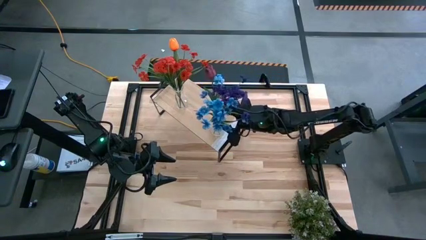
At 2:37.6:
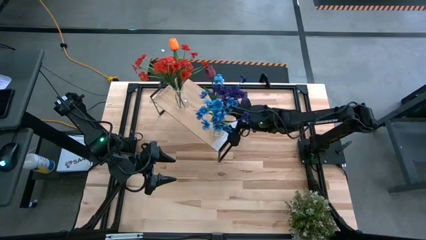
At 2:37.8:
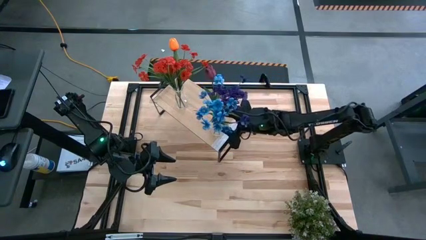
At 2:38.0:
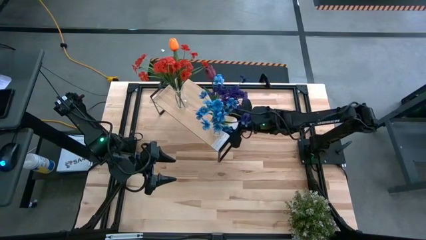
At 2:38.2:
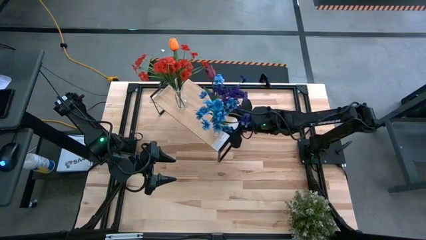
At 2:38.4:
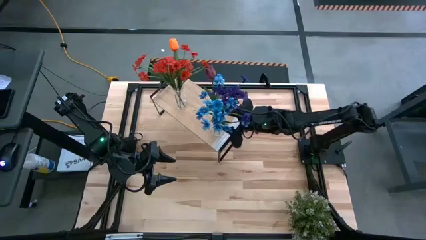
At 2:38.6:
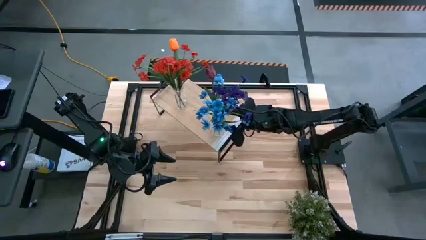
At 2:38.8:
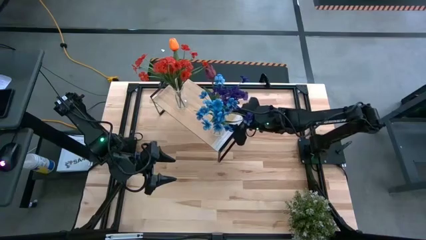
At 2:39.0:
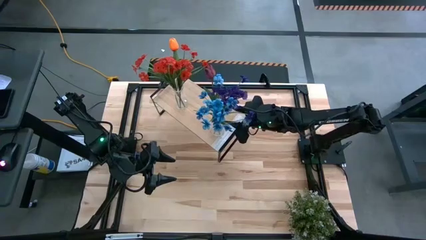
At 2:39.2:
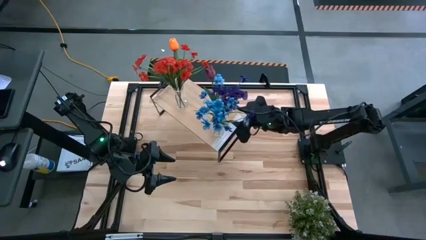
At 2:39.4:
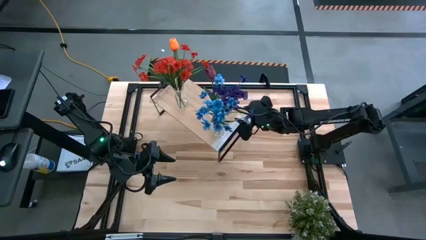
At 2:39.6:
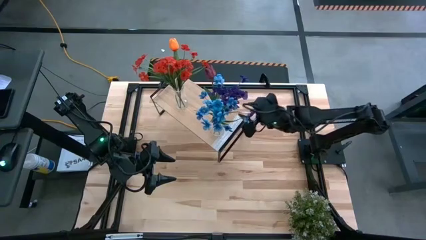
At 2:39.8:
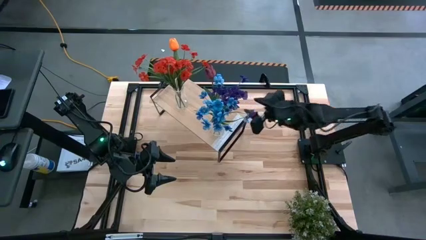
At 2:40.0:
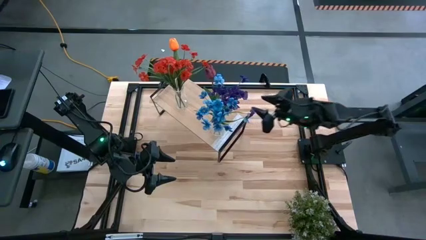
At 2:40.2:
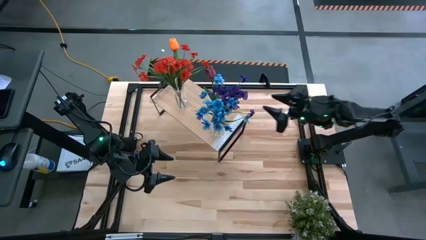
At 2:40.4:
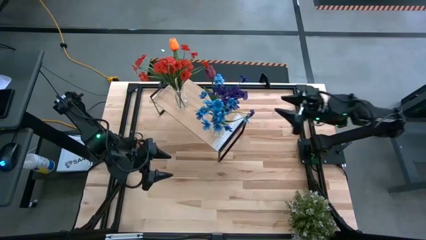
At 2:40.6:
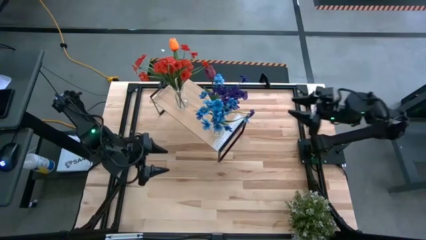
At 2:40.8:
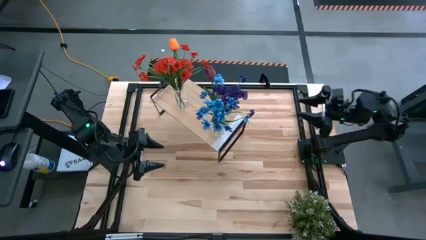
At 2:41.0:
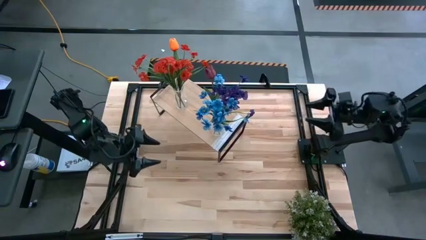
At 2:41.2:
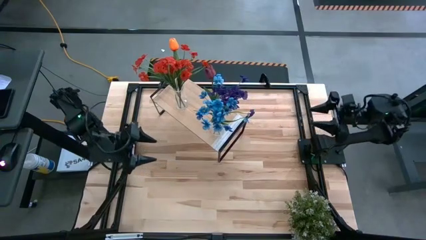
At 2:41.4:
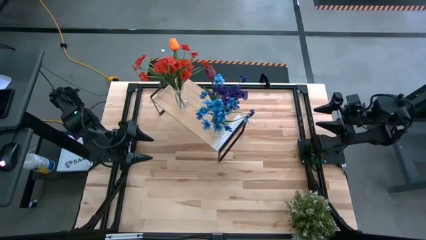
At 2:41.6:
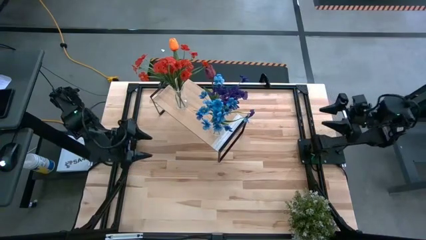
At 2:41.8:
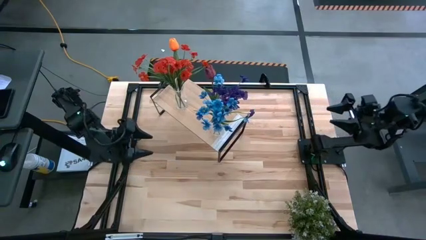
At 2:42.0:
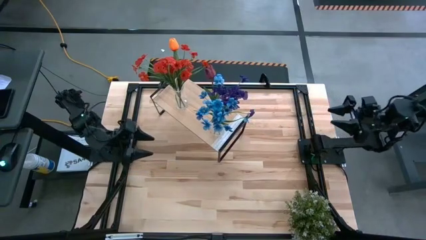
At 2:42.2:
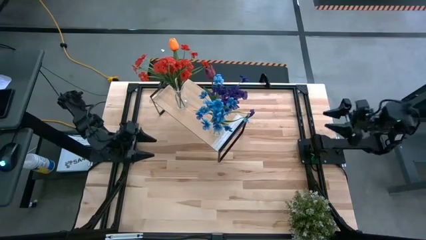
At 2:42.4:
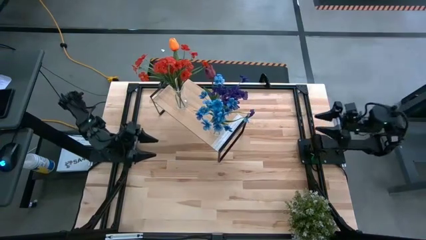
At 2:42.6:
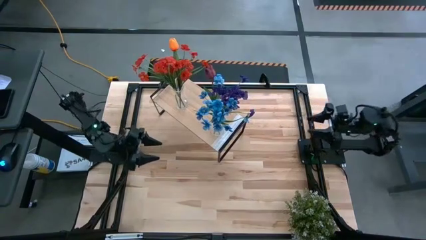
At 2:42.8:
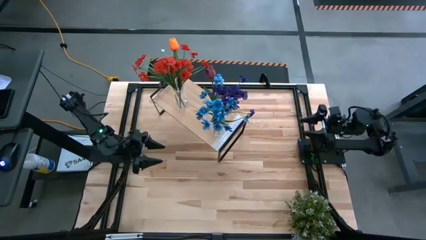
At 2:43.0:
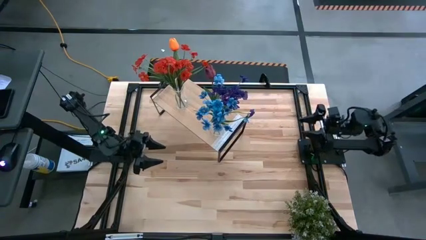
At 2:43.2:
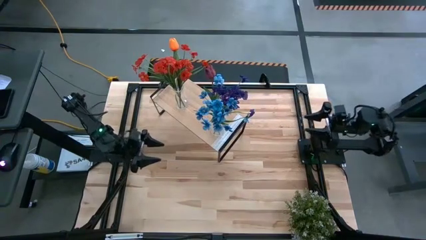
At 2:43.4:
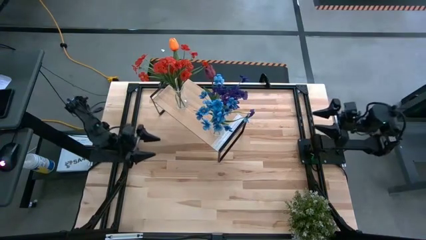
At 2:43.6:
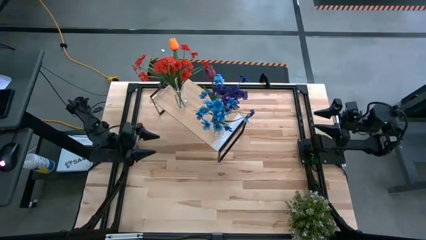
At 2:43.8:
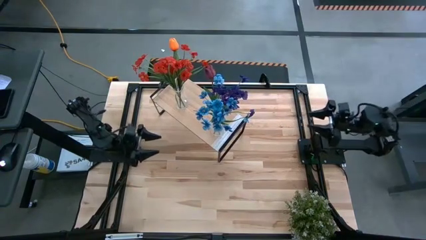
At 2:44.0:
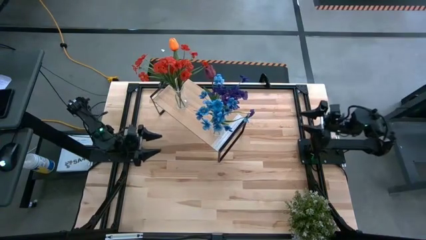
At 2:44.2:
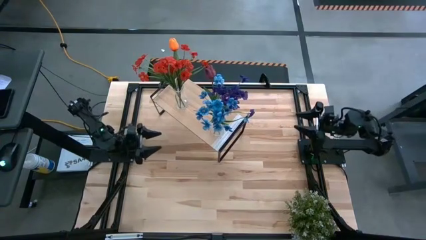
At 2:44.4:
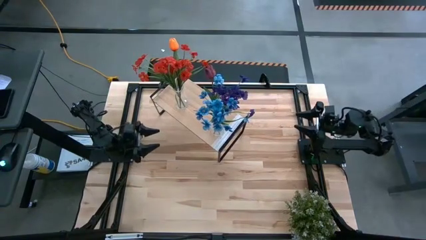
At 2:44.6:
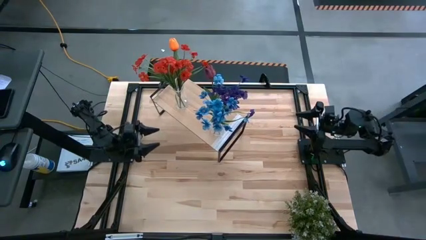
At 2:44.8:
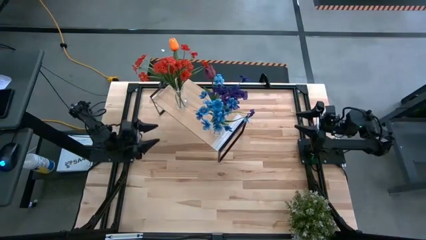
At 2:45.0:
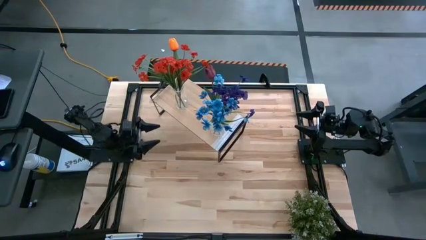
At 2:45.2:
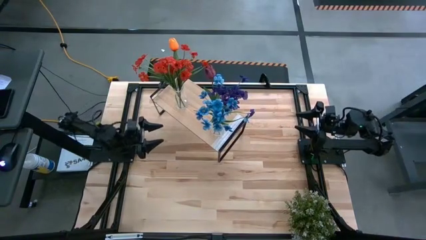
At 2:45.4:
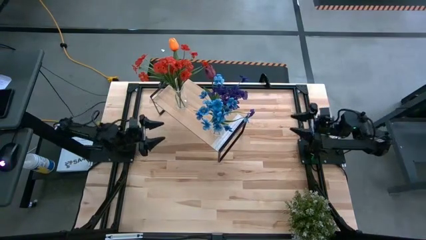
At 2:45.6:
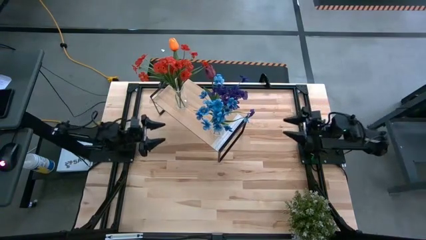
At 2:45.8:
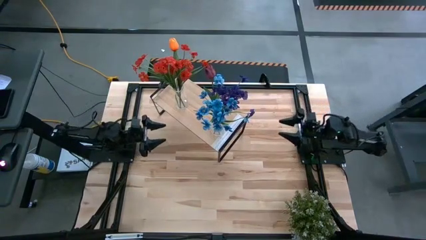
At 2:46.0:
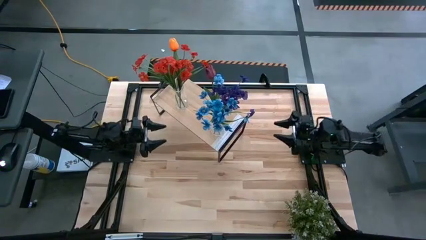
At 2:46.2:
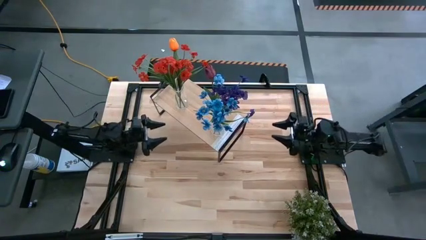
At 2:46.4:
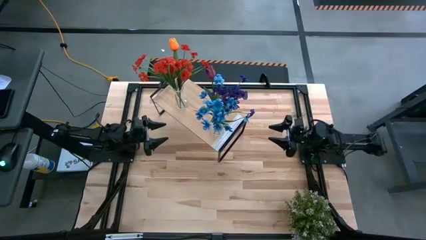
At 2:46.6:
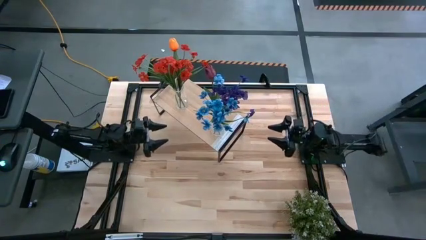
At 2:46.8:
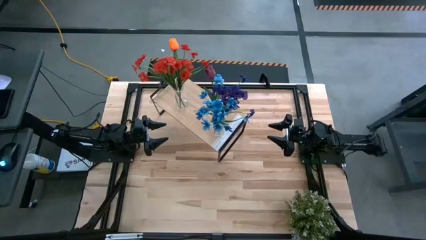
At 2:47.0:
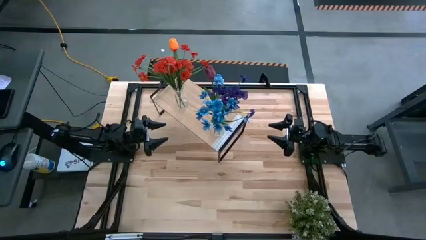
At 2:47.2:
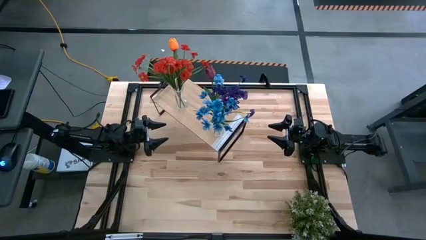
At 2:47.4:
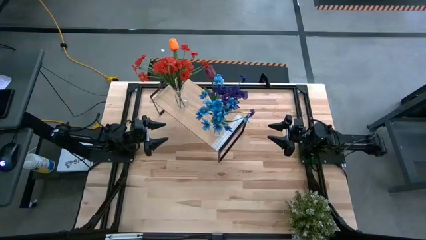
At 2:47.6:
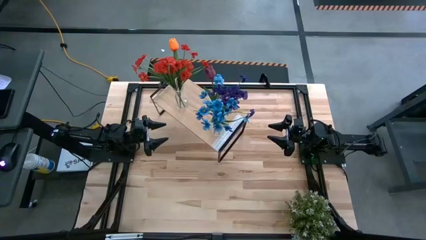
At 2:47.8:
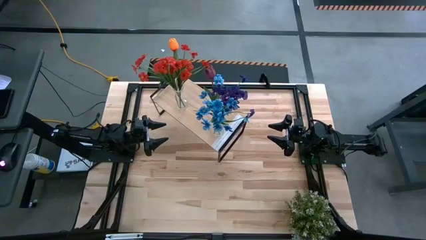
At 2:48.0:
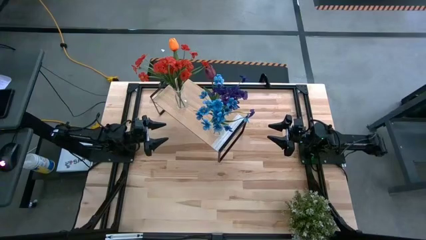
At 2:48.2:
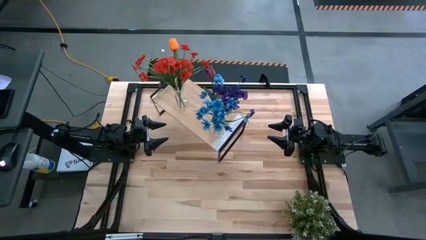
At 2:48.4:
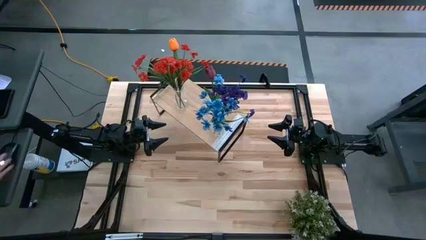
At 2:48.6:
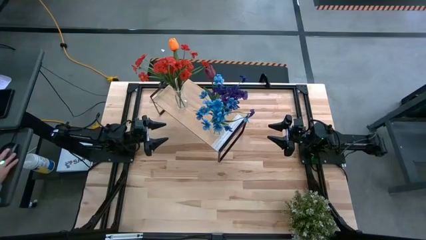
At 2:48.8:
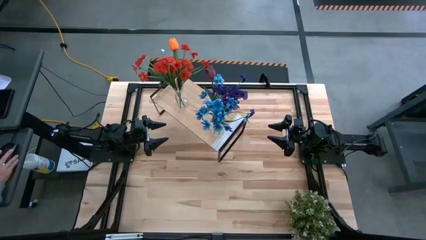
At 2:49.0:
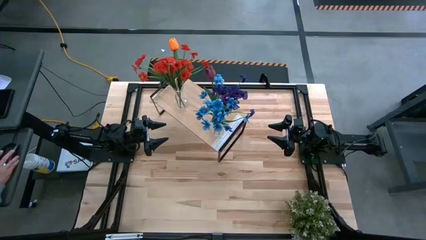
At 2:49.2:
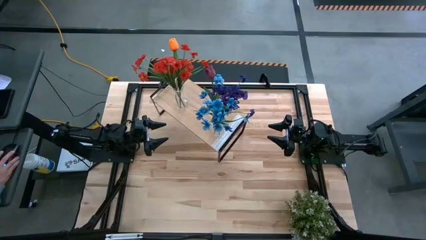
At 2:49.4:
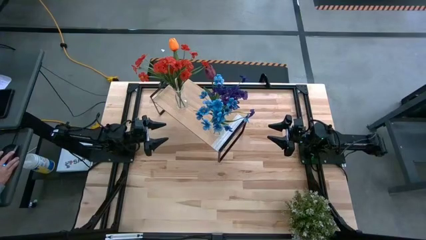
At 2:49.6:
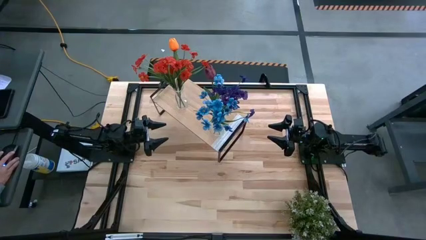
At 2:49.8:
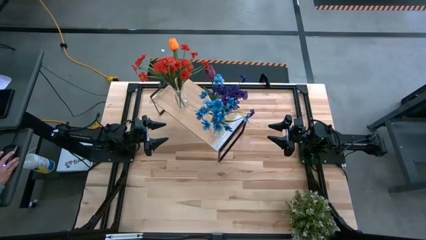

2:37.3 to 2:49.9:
Task: Pick and place flowers into a vace then onto a shelf
Return to Home Position

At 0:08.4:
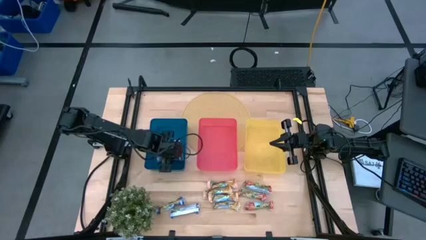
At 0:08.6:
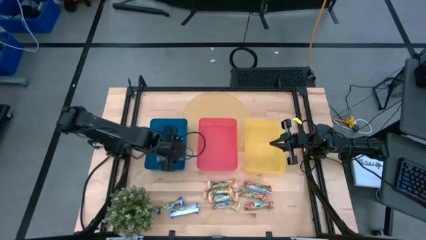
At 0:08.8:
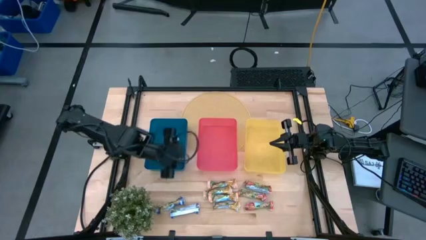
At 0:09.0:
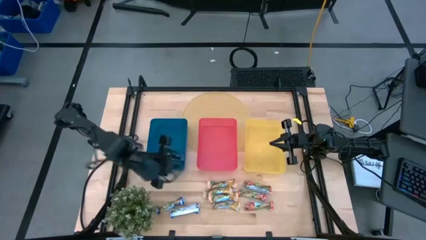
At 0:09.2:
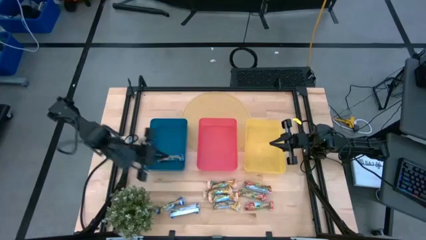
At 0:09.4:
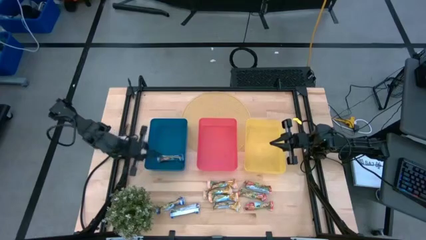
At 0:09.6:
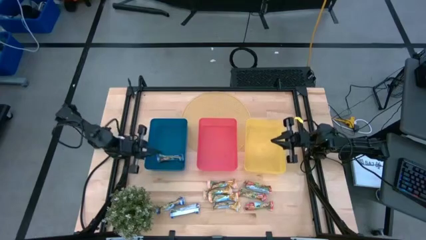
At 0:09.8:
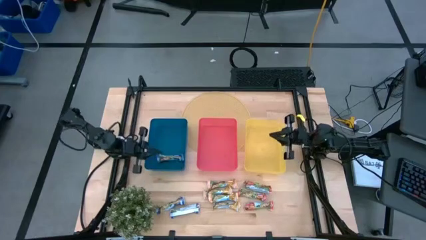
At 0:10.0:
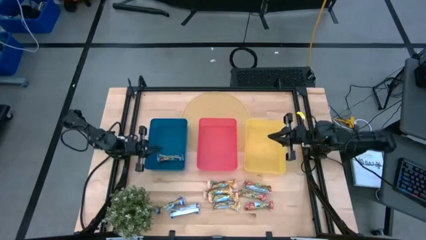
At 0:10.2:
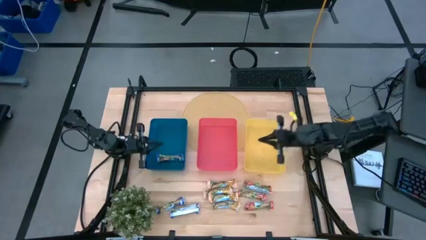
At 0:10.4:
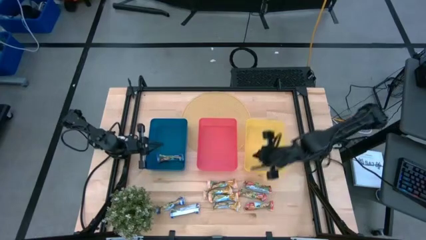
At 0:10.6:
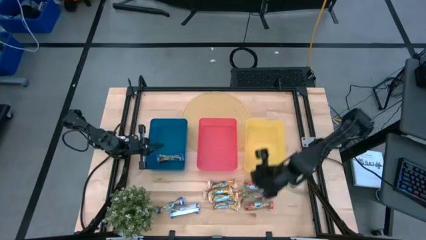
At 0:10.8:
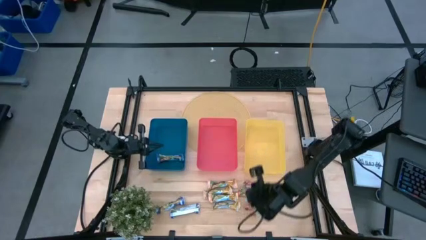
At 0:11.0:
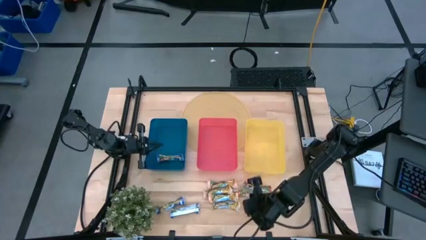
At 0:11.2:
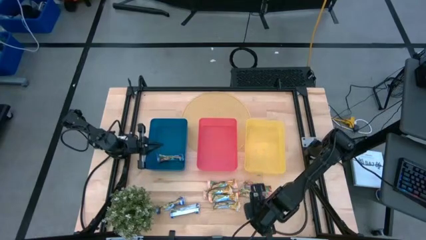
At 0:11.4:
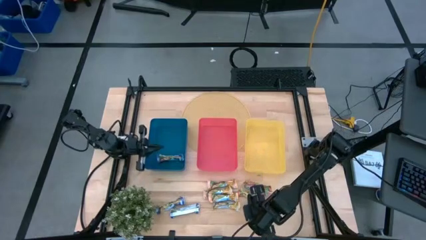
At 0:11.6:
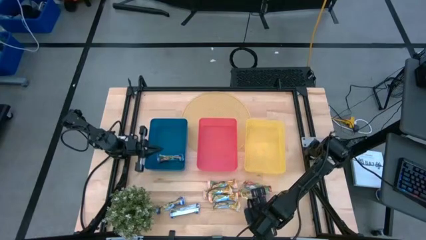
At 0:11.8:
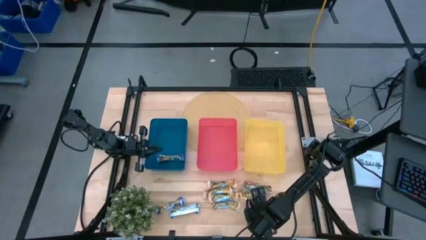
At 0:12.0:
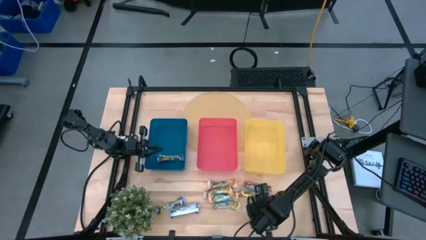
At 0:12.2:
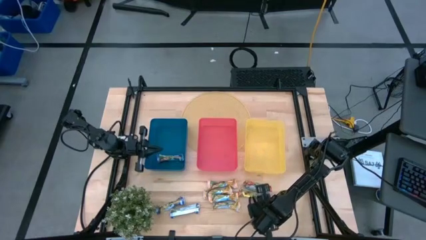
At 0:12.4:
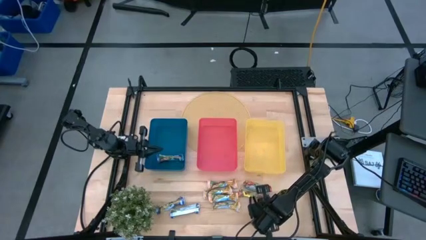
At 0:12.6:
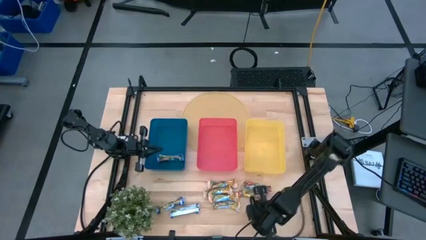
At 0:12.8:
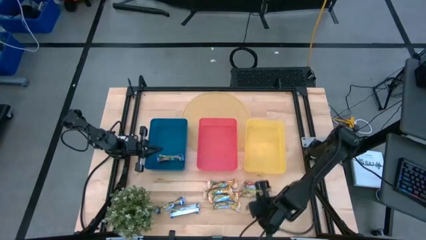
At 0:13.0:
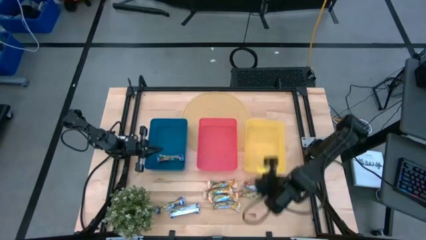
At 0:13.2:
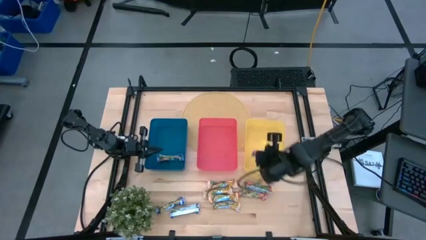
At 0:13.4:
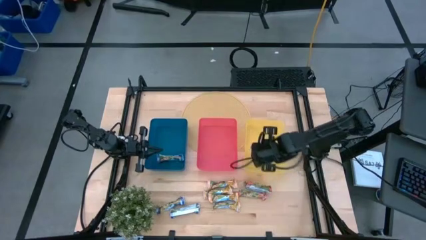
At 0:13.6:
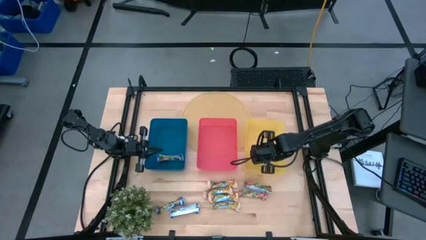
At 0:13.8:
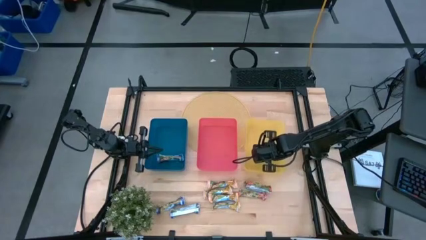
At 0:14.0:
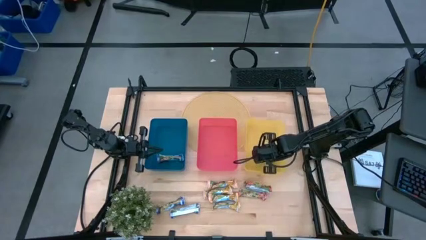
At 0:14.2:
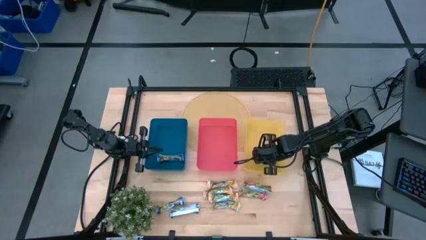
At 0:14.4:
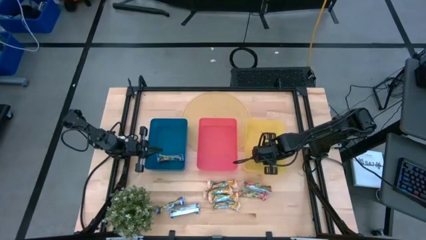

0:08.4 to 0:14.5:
Task: Pick and place Granola Bars by type
Put the bottom green granola bar into yellow bin
